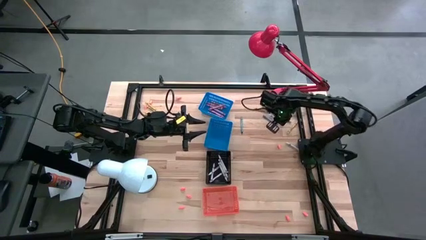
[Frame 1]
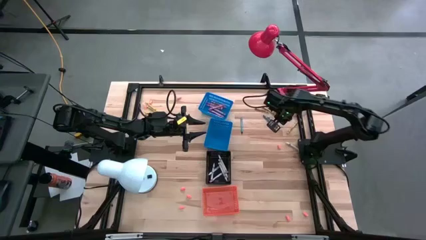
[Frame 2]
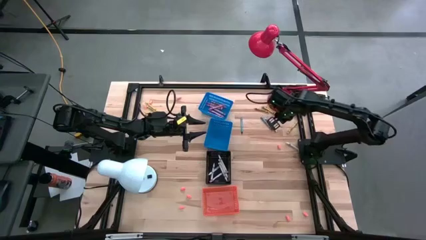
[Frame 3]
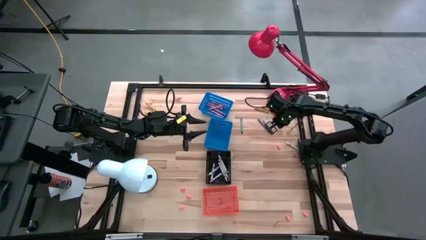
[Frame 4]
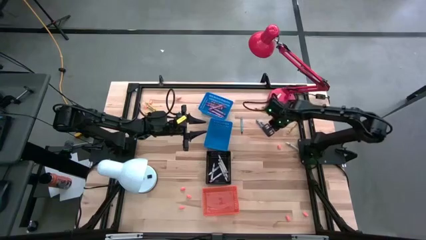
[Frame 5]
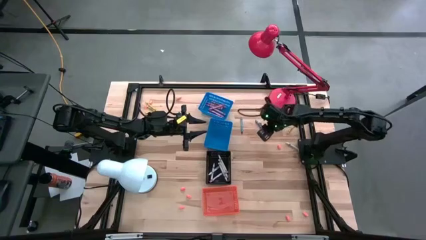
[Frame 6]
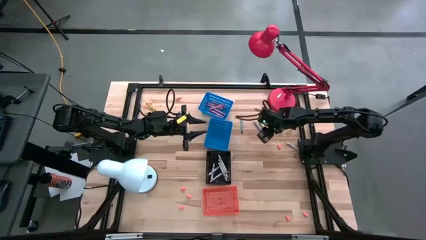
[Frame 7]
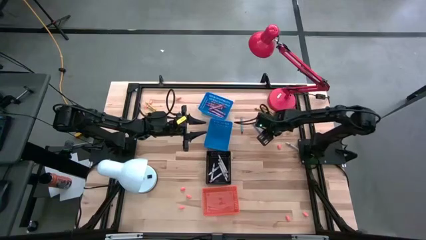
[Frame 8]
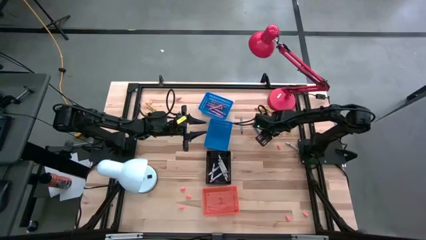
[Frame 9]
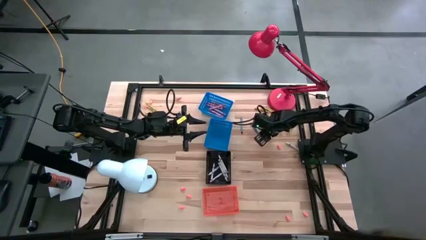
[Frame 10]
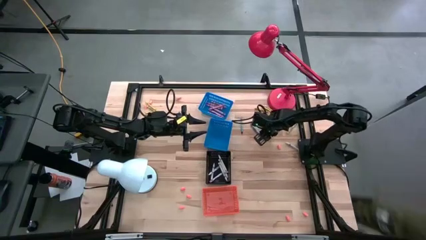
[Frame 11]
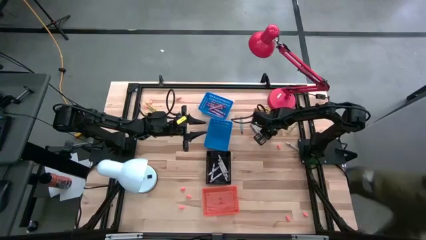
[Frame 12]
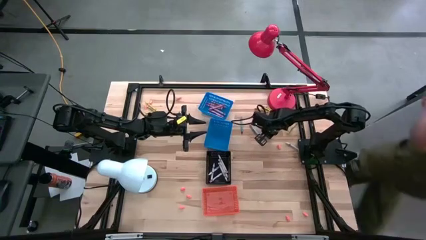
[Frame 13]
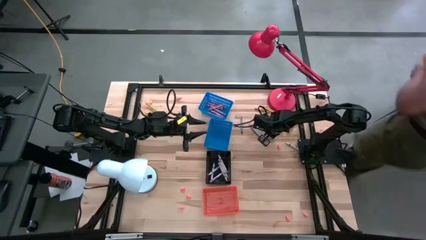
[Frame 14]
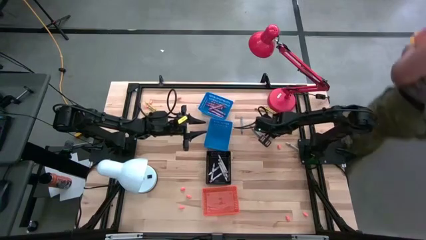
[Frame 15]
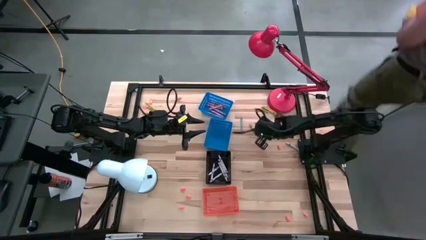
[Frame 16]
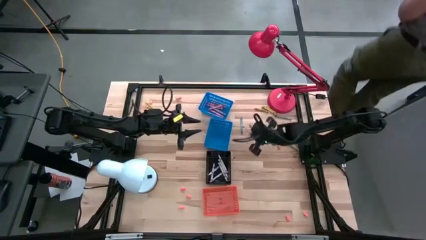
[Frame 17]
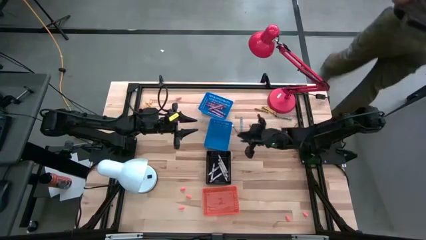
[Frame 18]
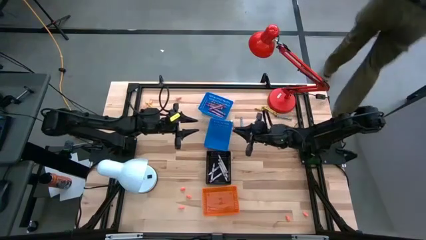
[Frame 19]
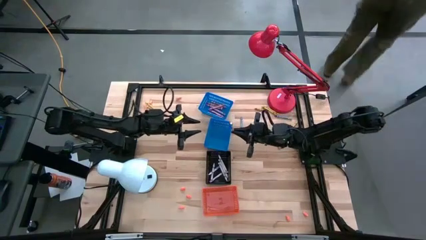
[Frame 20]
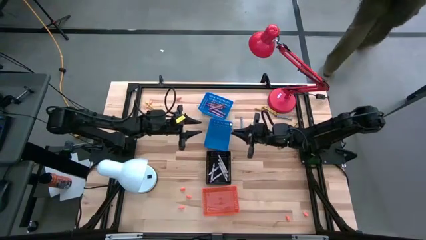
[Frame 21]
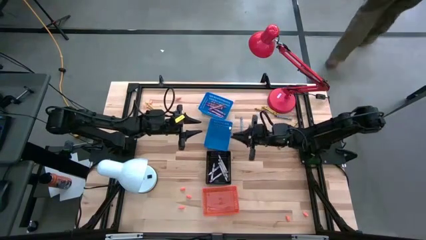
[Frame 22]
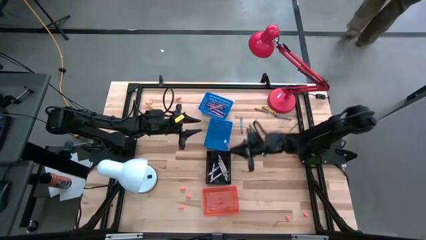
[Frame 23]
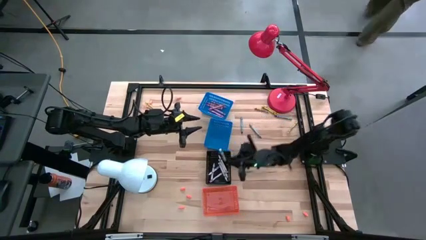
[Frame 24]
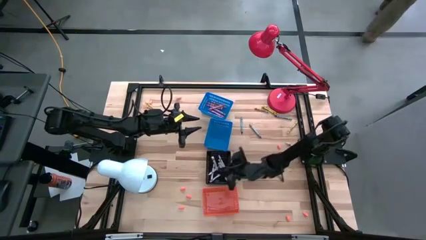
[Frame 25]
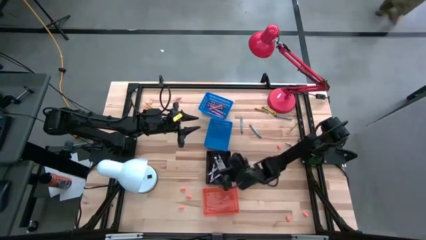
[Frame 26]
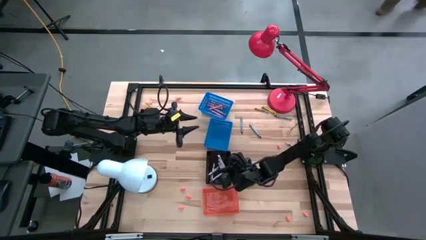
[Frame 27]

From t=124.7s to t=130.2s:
Task: Sort crayons
Put the white crayon into the black bin

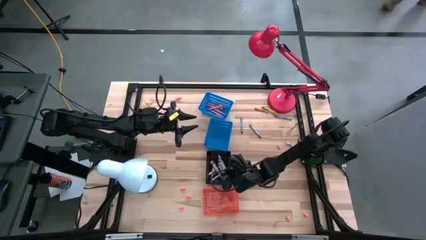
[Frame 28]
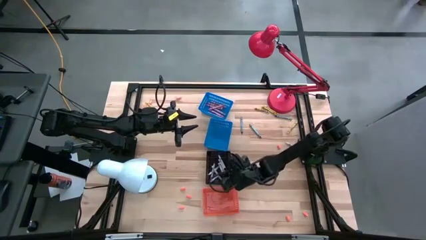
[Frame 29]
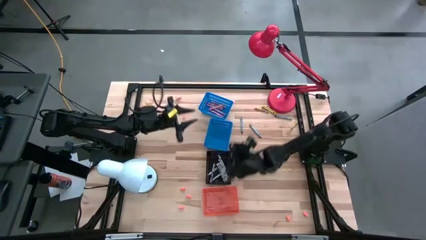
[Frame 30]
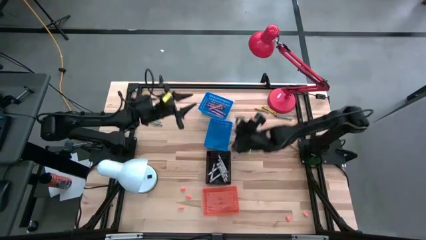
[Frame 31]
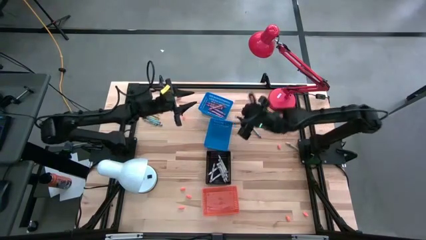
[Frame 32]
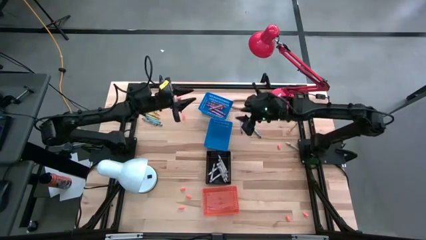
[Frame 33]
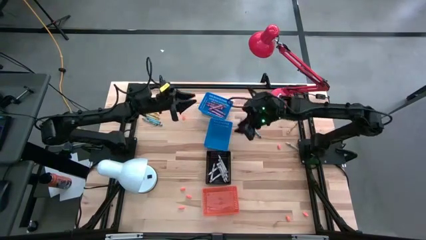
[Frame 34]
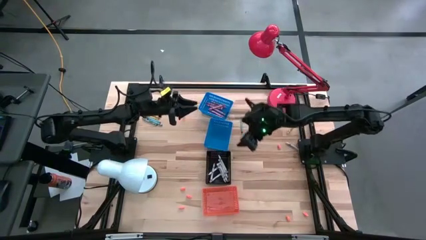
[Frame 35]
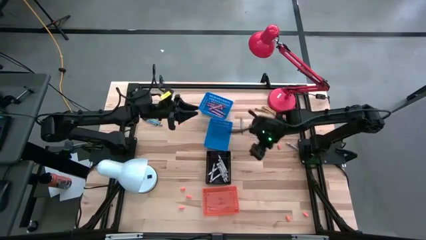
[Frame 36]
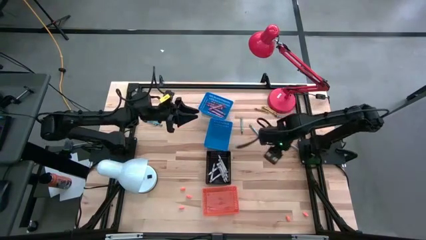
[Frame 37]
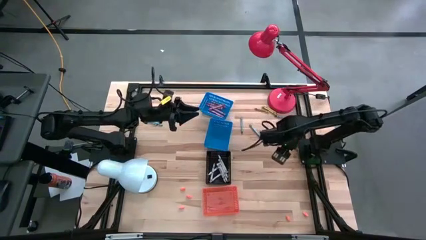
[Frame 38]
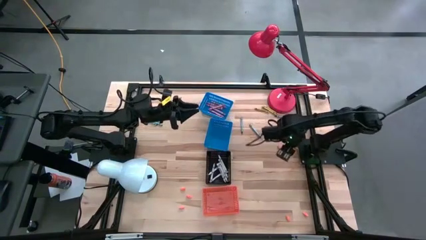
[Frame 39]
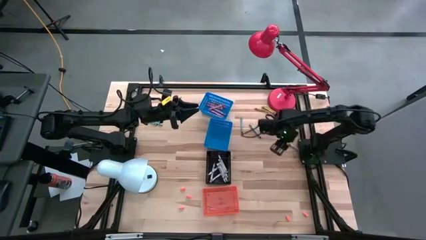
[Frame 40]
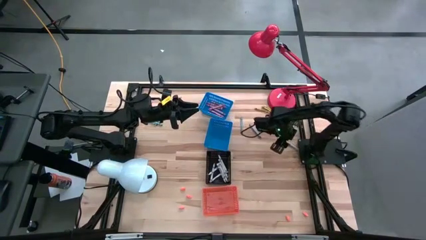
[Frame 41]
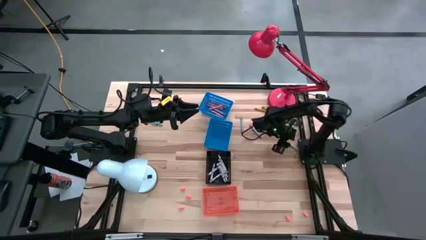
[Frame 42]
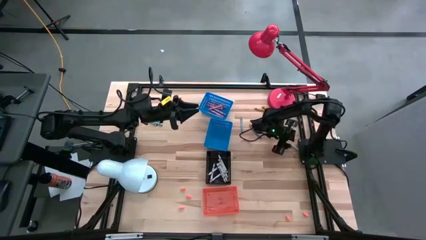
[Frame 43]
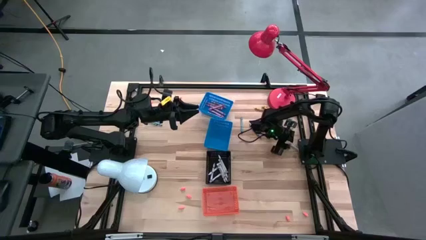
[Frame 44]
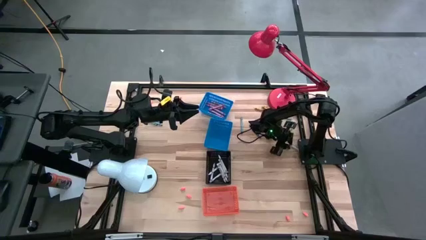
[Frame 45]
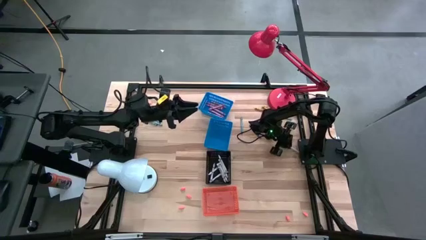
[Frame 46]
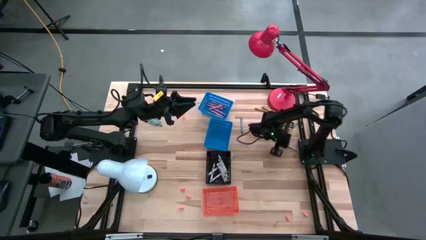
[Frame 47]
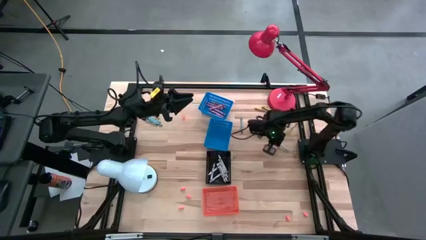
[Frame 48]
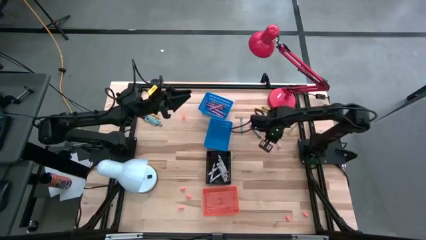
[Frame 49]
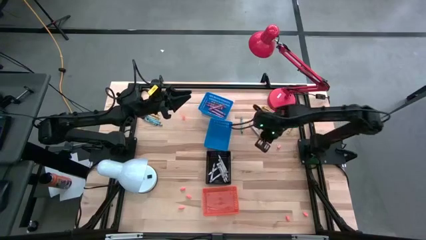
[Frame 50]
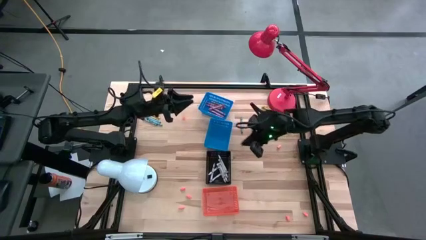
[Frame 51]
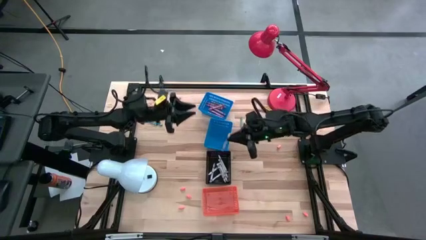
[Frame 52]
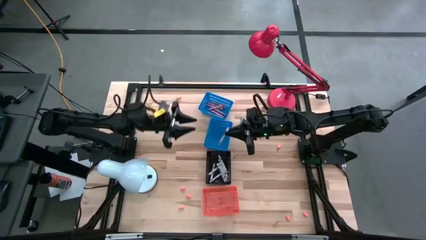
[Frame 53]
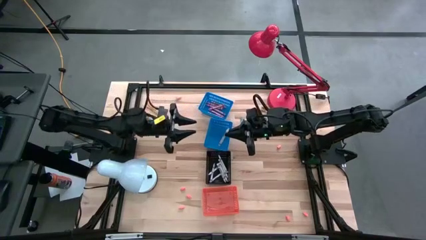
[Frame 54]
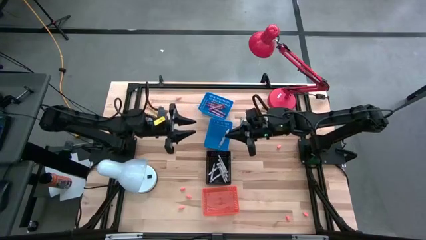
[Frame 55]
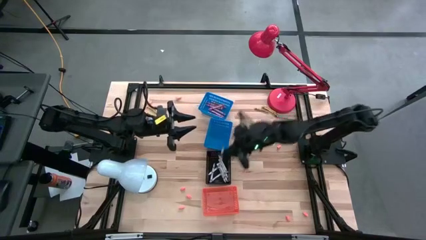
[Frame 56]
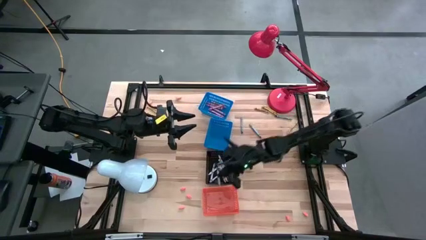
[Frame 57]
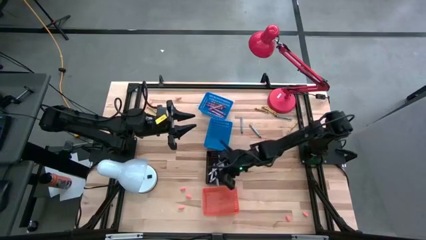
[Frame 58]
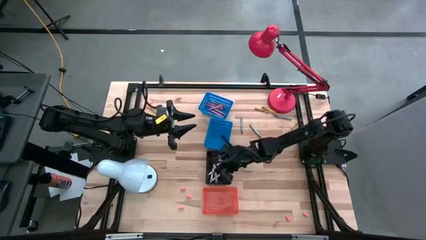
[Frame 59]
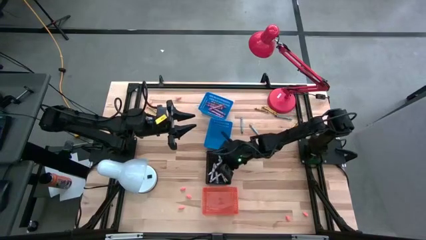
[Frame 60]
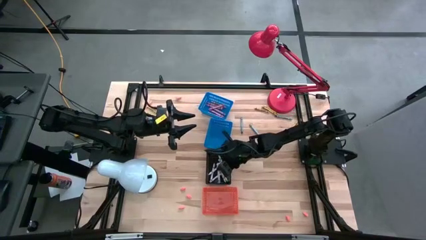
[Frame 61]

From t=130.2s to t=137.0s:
Put the white crayon into the black bin

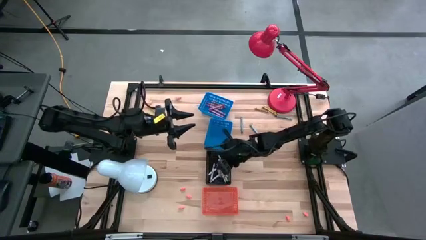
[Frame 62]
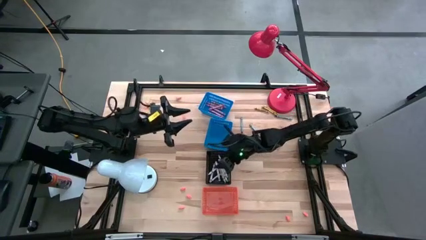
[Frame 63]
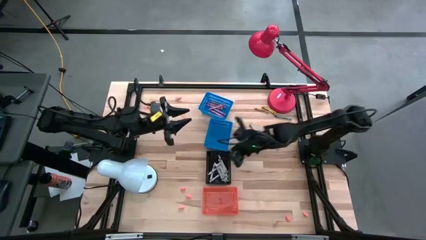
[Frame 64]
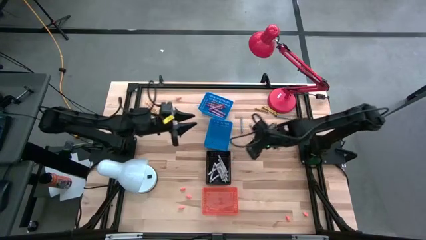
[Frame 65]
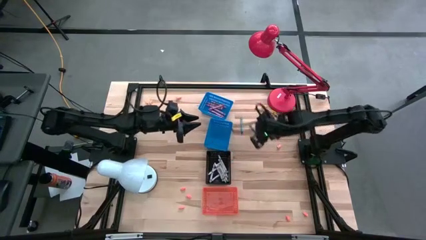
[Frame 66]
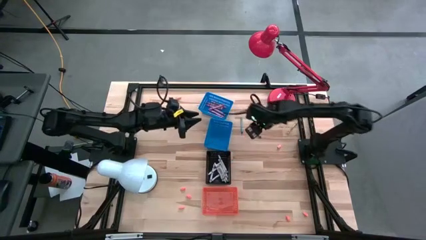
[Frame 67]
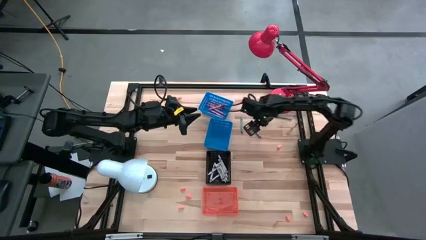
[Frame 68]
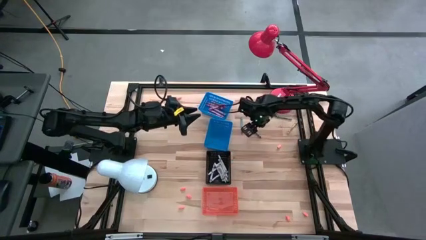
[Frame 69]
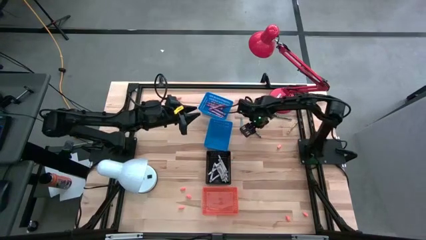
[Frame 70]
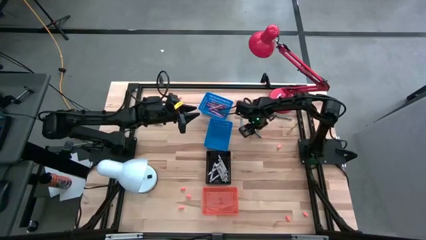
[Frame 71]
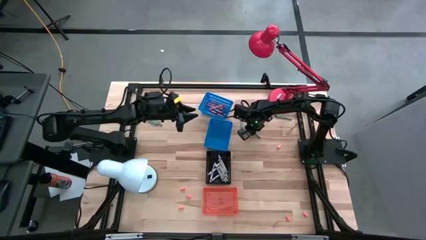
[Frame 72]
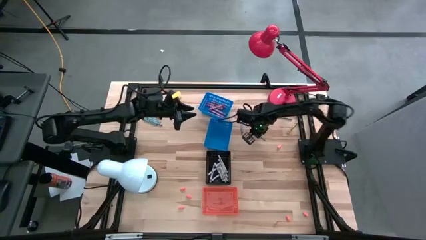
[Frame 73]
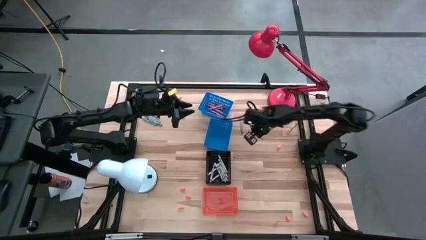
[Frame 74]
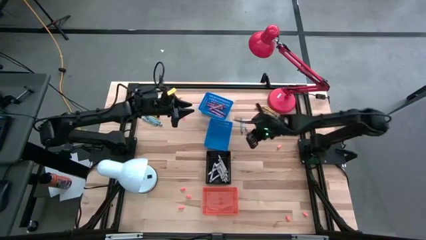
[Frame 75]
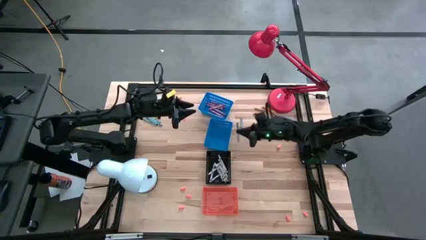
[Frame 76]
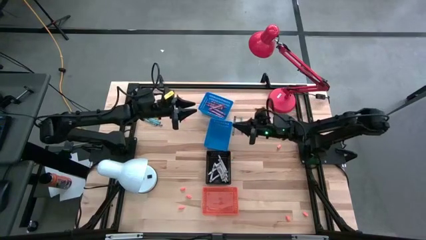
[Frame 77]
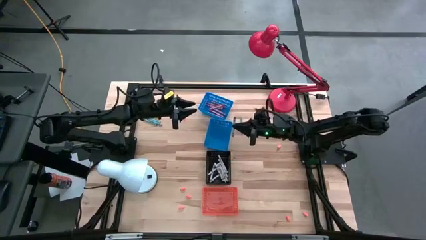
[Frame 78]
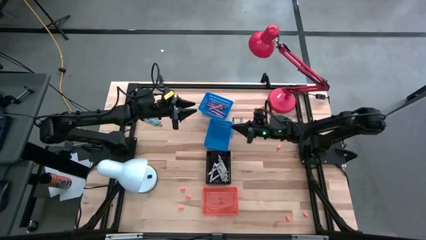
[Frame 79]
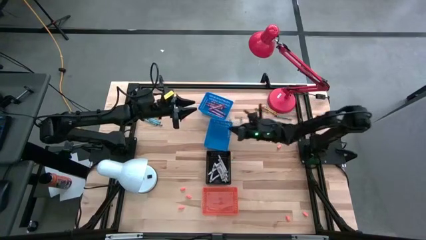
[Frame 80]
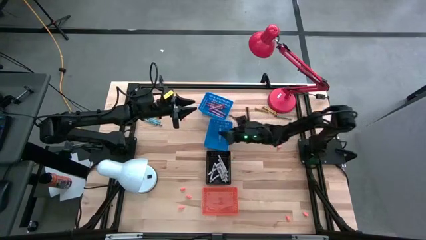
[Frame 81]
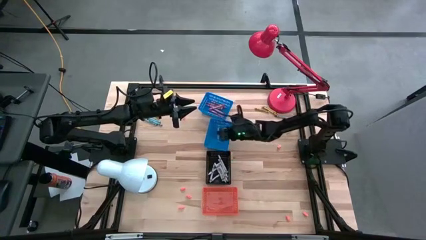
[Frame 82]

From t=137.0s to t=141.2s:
Put the blue crayon into the bottom blue bin
